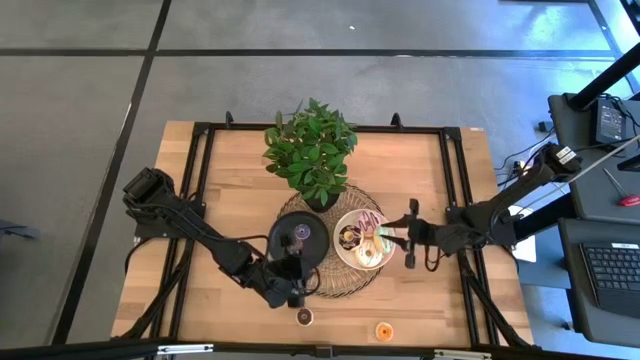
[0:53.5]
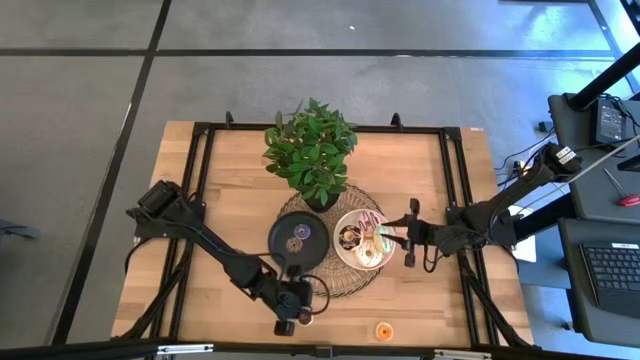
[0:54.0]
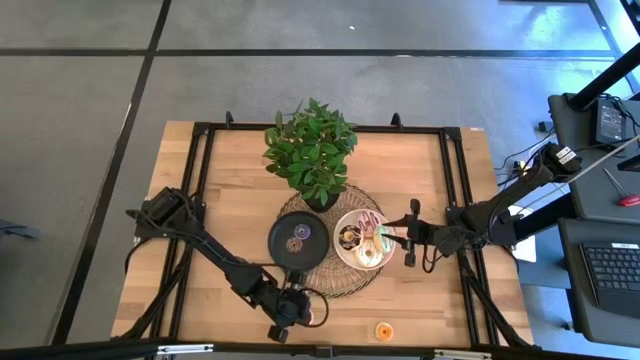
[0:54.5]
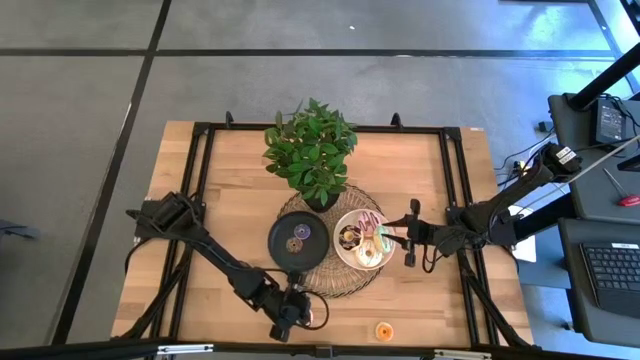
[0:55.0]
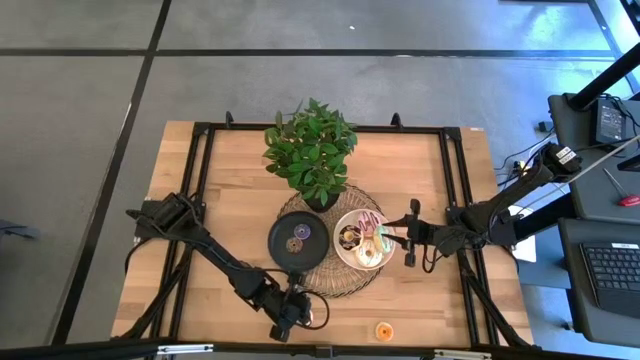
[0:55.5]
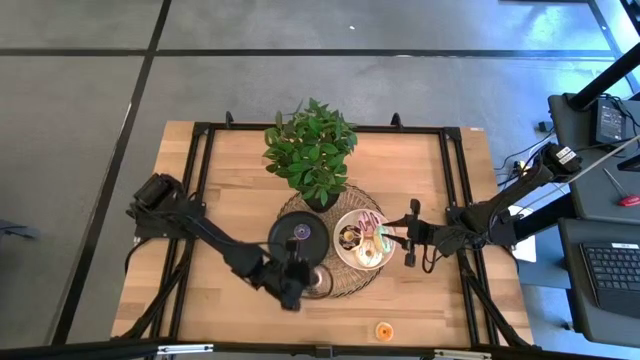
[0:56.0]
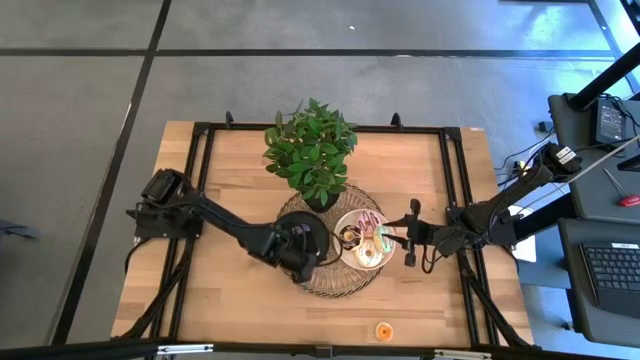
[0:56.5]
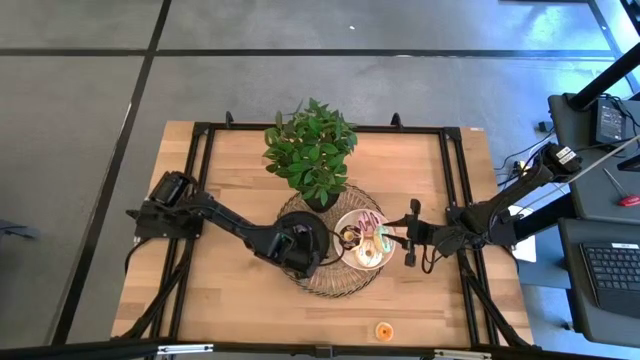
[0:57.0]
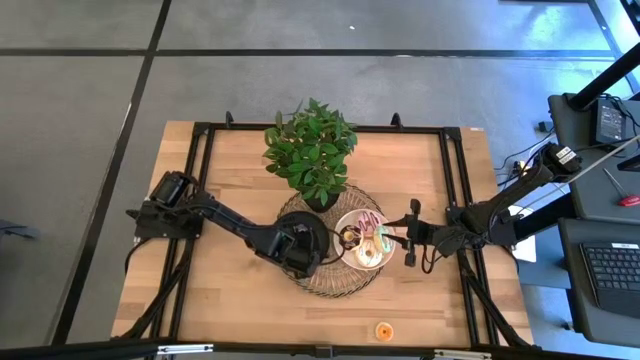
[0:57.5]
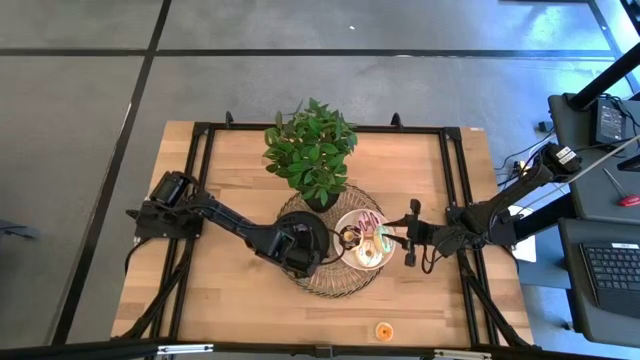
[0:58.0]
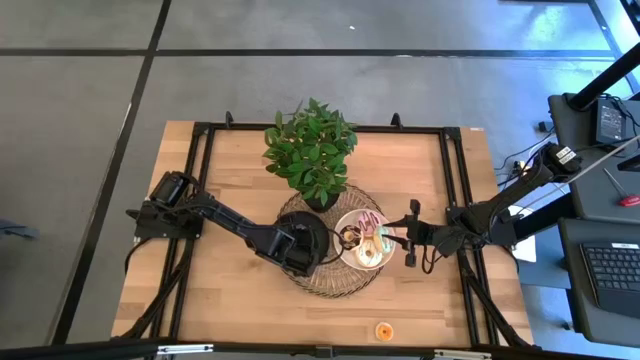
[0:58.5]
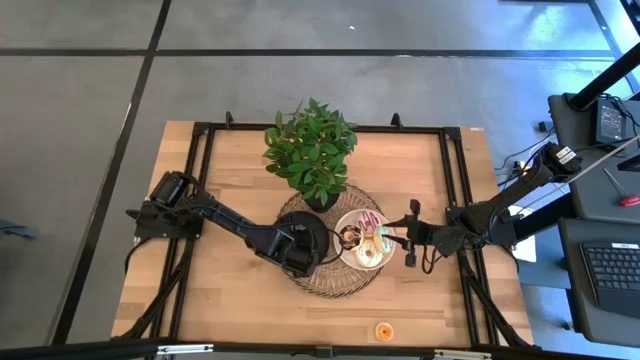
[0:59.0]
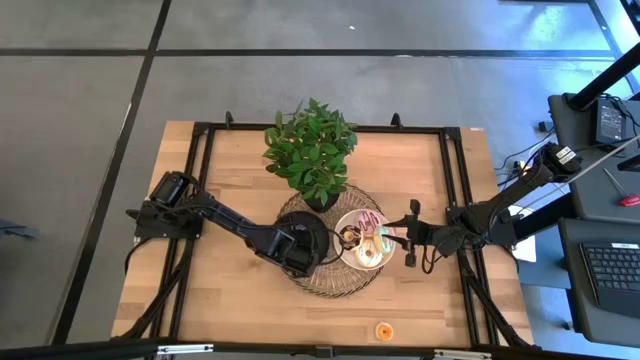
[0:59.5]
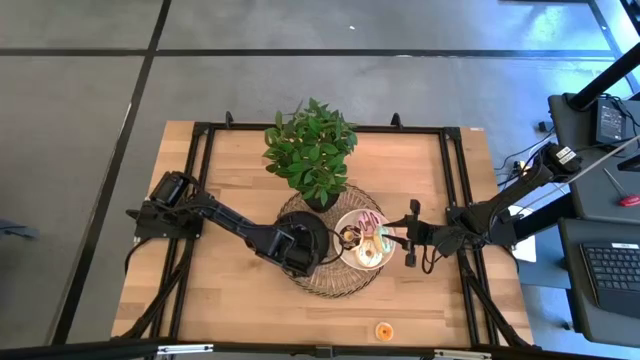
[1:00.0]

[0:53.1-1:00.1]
Task: Pick & Place donuts
Put the small dark brown donut on the black plate

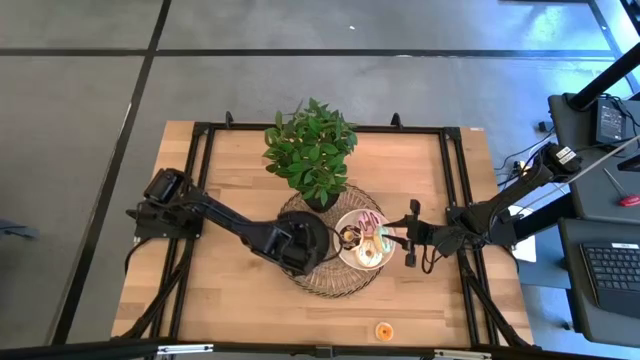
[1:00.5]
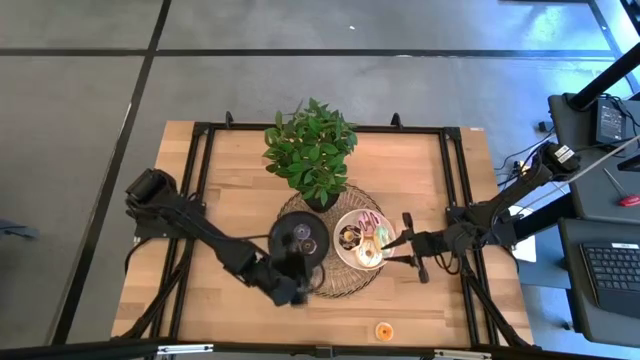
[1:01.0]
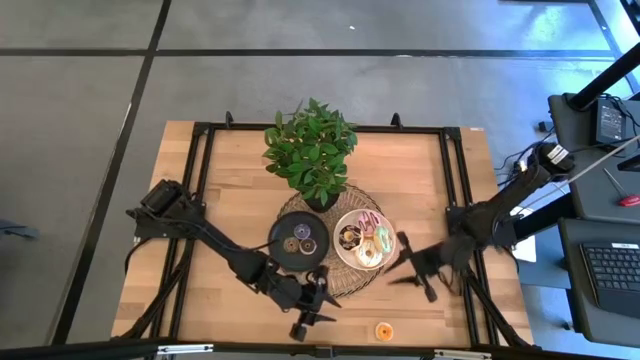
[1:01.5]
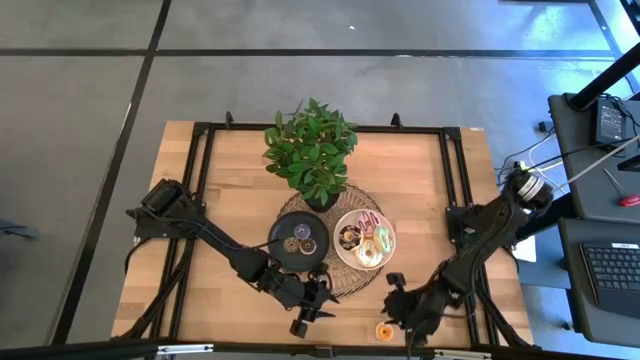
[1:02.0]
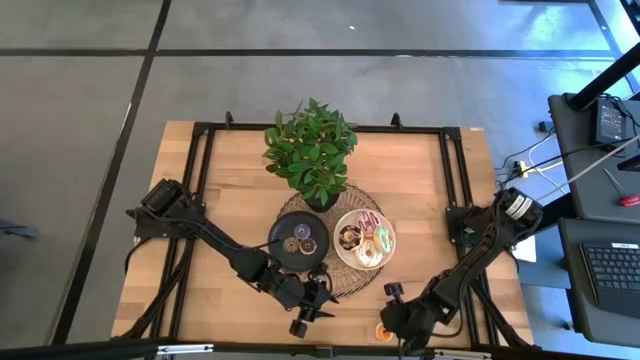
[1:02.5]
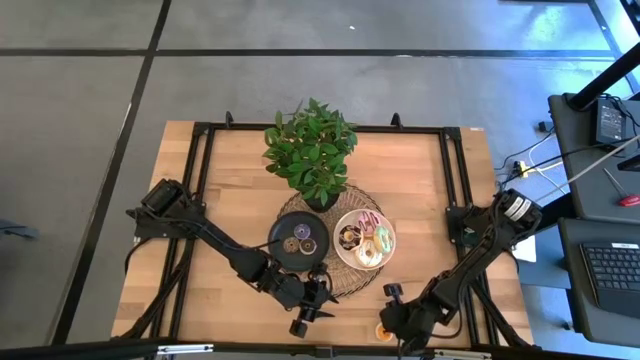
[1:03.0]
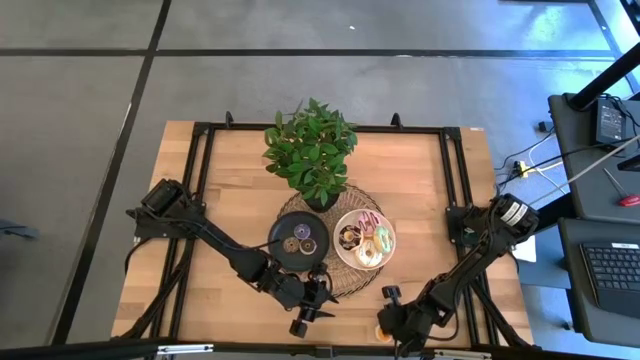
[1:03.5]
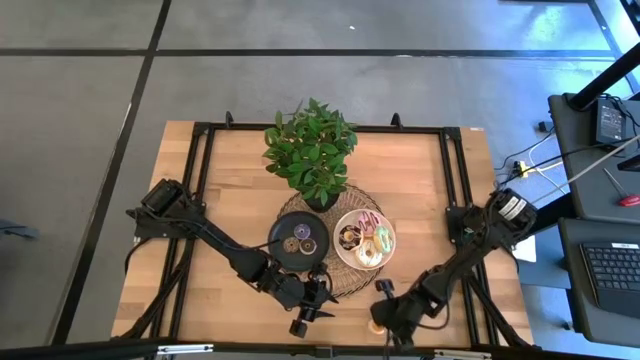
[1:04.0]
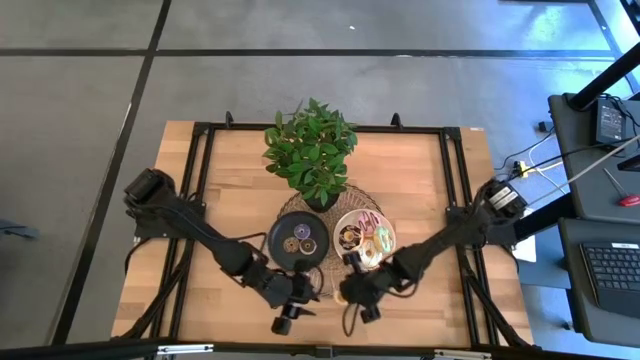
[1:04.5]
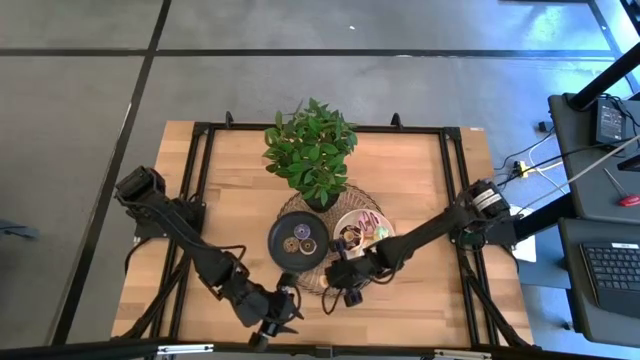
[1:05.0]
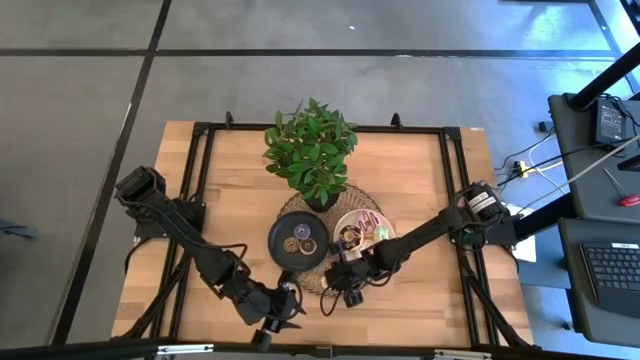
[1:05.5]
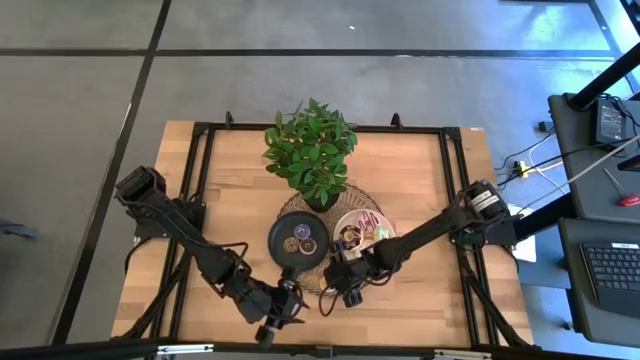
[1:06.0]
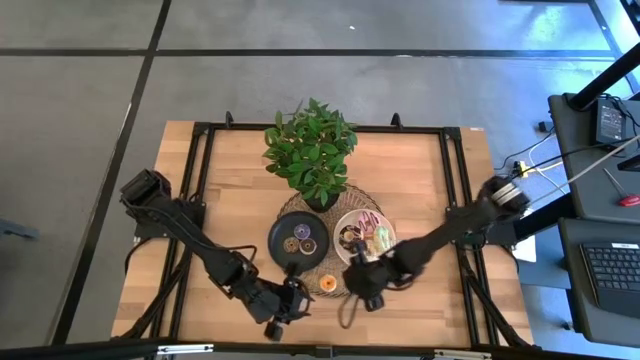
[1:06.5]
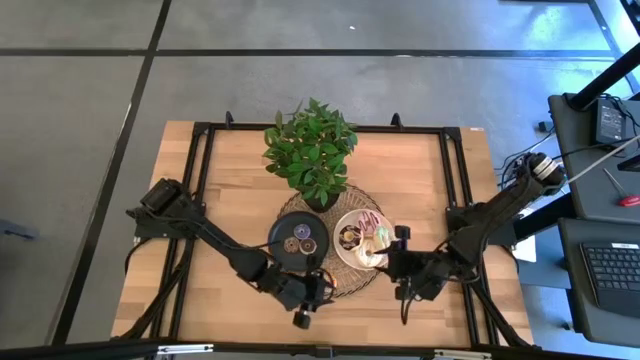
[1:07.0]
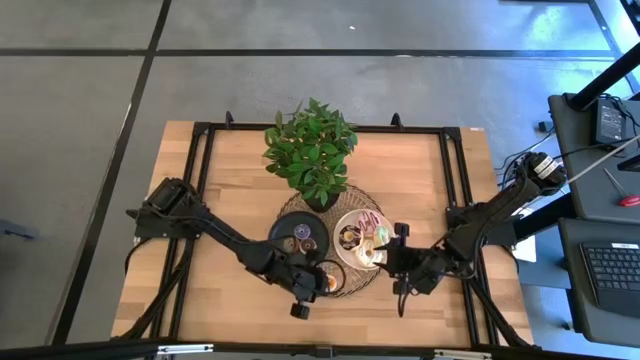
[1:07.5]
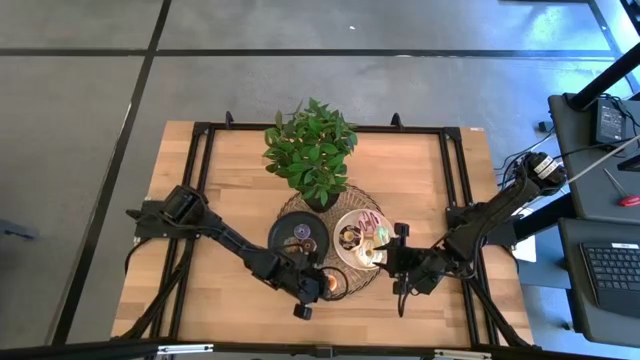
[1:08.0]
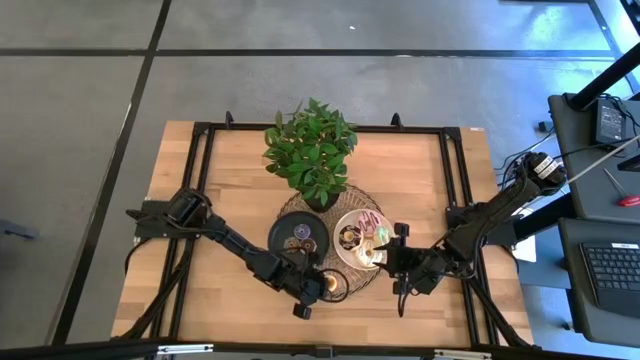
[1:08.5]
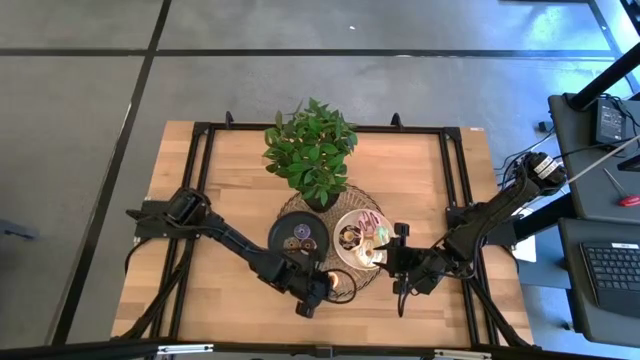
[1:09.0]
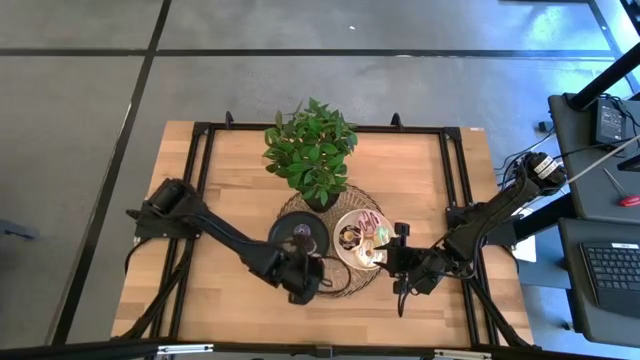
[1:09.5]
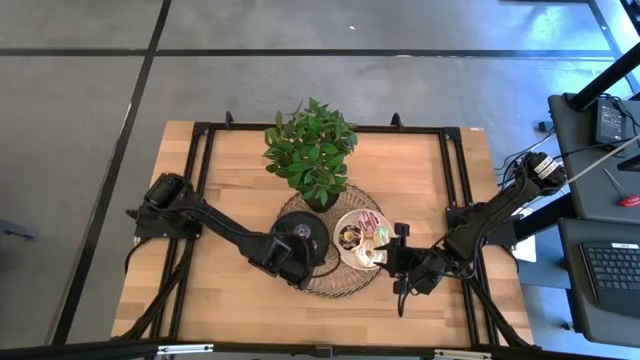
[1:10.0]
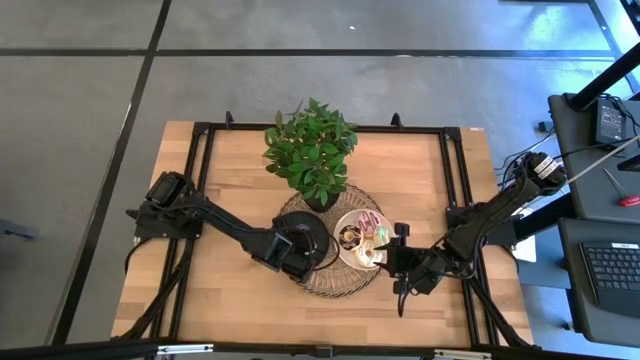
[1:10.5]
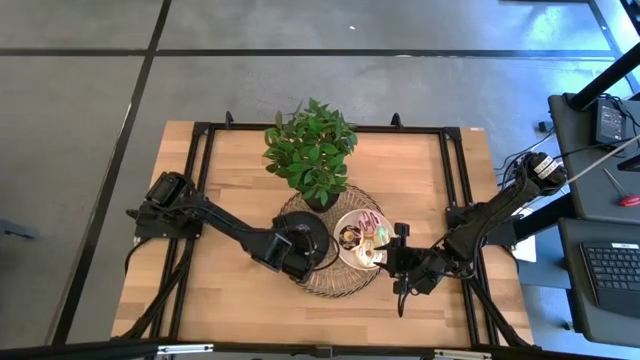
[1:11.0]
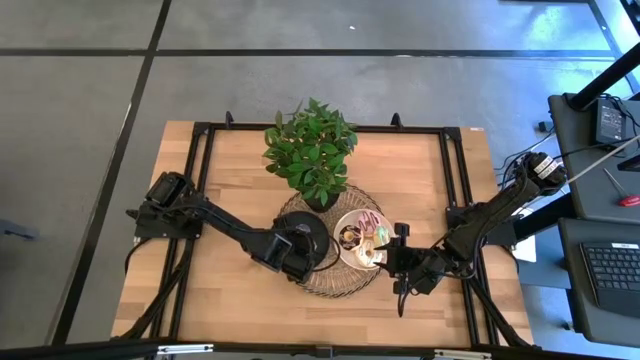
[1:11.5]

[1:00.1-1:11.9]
Put the small yellow donut on the black plate

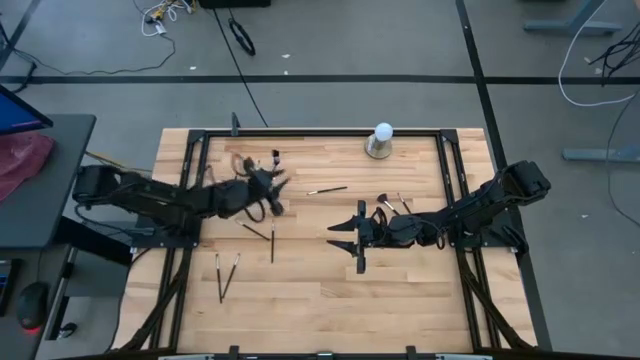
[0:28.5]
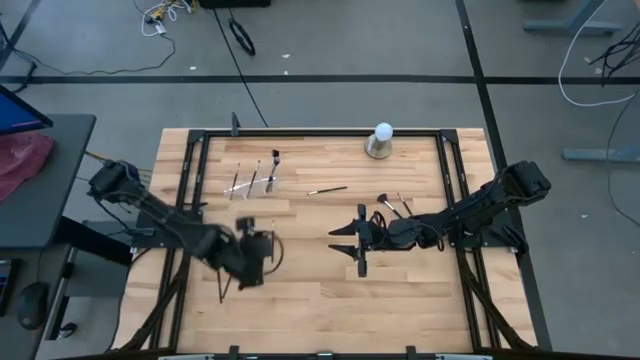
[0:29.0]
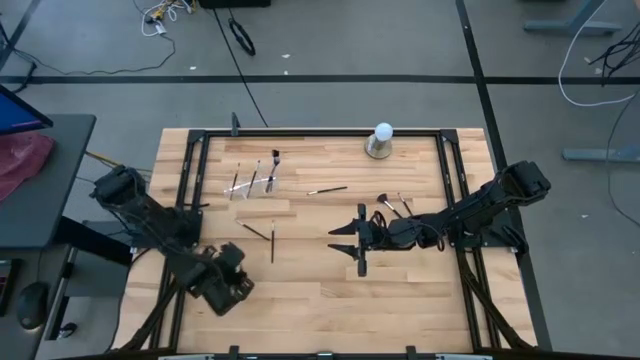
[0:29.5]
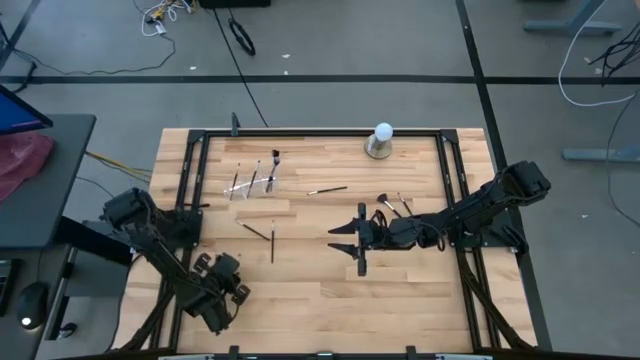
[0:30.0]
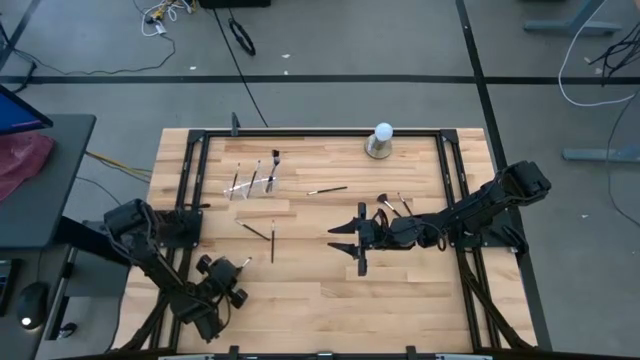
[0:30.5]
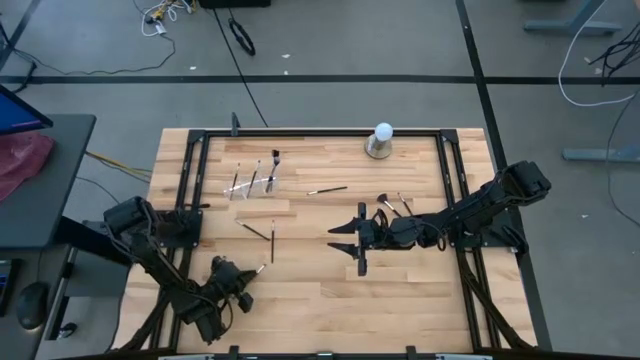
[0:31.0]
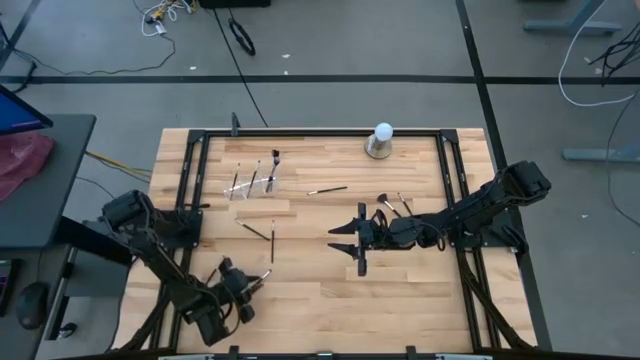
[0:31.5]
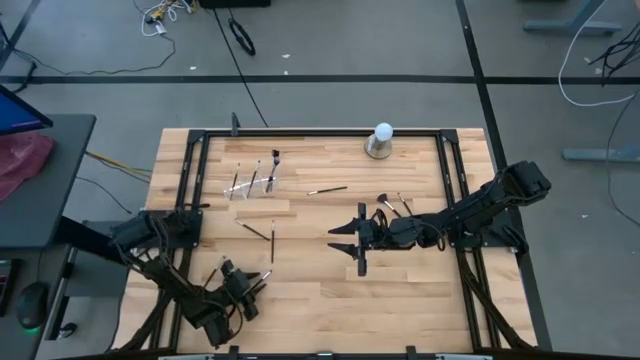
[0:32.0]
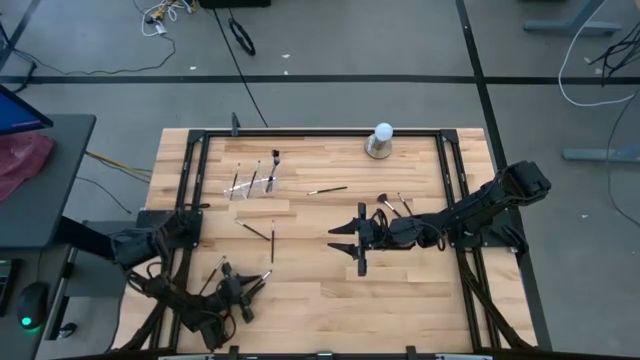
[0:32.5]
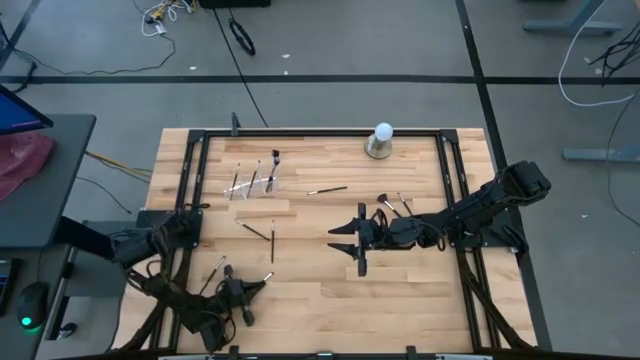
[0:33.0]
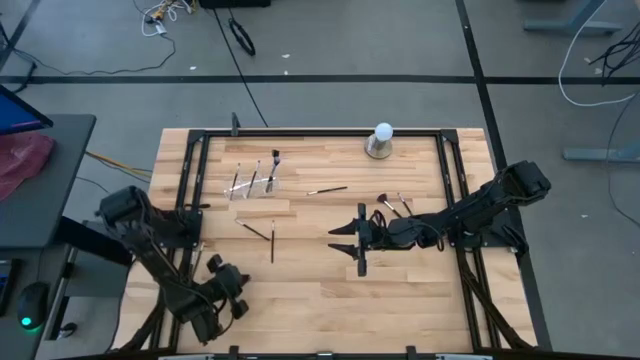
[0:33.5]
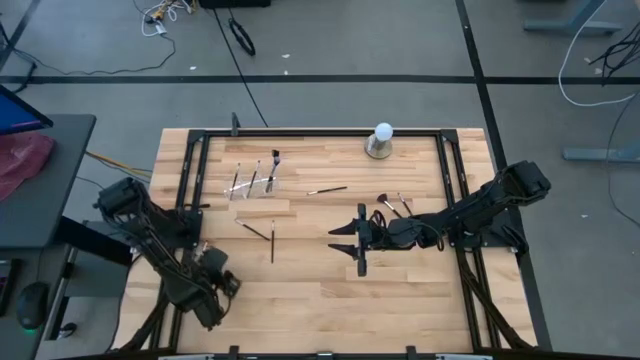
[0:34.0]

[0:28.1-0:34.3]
Task: Put items in baskets/containers
Put the black eyeshadow brush into the left section of the transparent organizer
